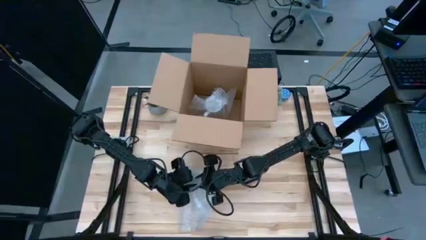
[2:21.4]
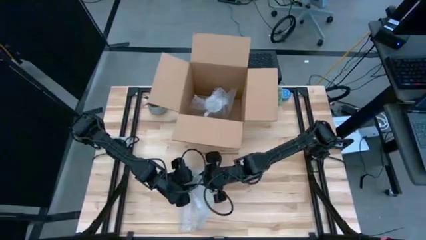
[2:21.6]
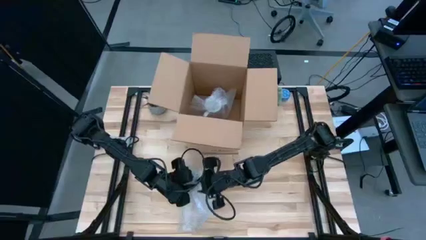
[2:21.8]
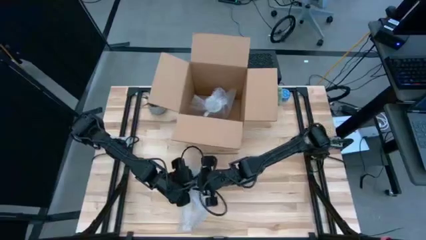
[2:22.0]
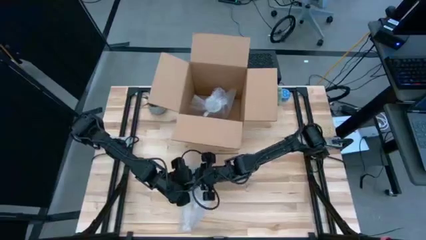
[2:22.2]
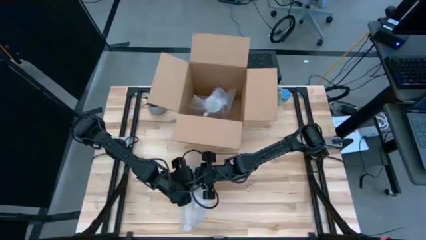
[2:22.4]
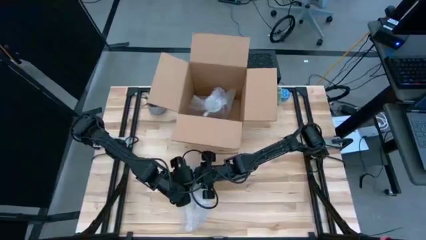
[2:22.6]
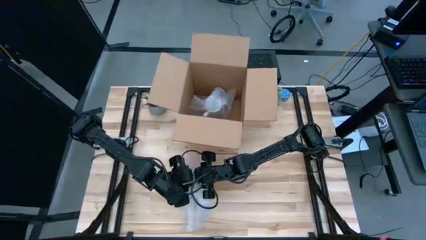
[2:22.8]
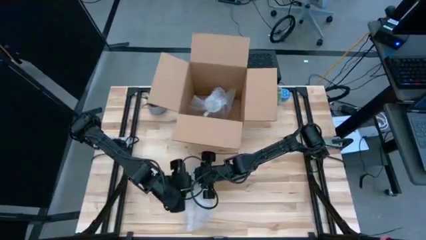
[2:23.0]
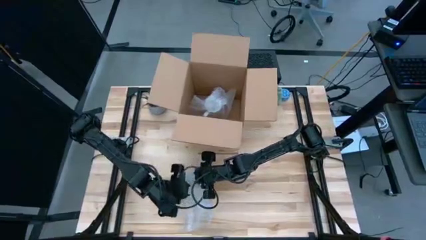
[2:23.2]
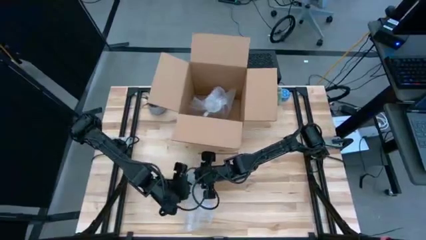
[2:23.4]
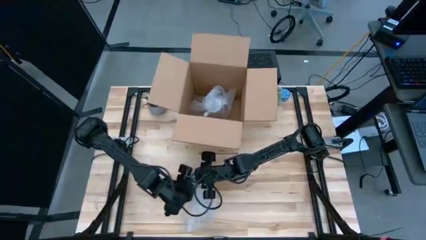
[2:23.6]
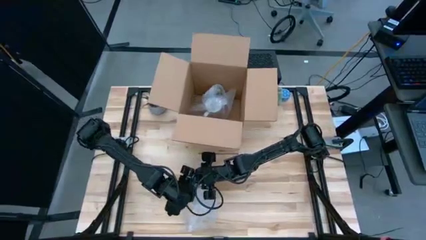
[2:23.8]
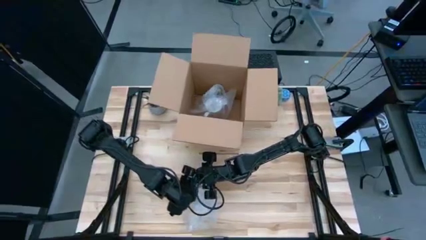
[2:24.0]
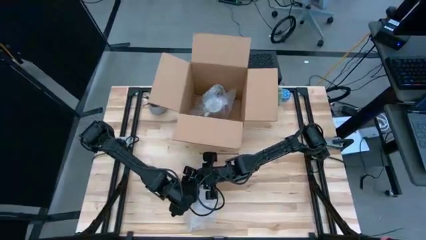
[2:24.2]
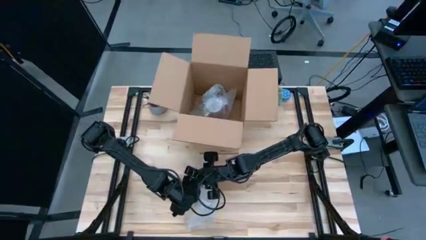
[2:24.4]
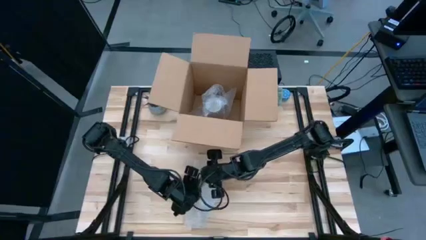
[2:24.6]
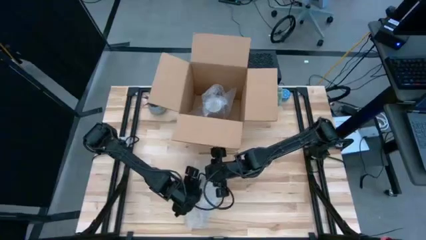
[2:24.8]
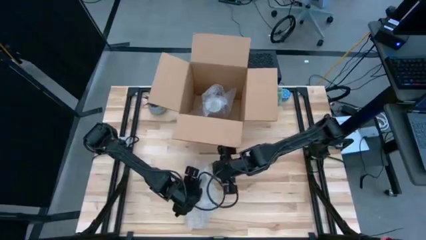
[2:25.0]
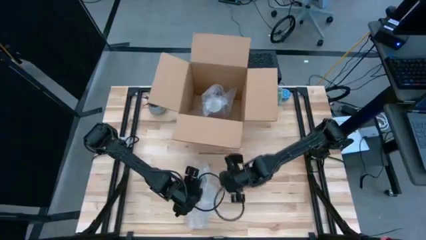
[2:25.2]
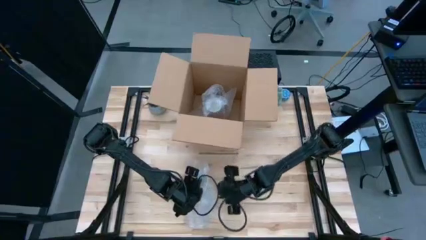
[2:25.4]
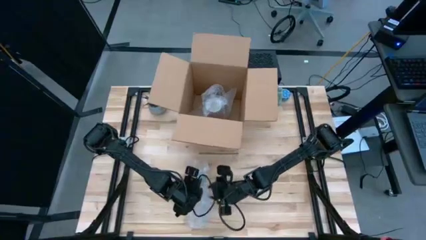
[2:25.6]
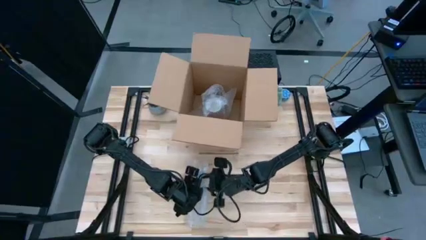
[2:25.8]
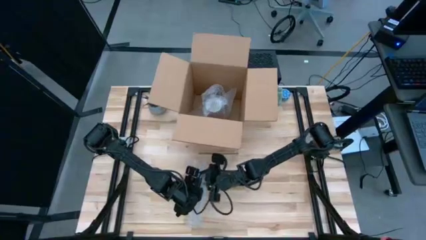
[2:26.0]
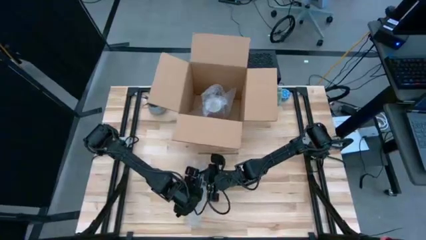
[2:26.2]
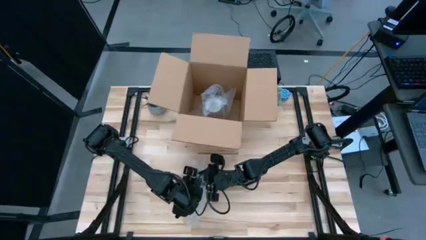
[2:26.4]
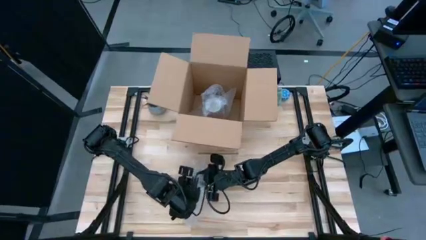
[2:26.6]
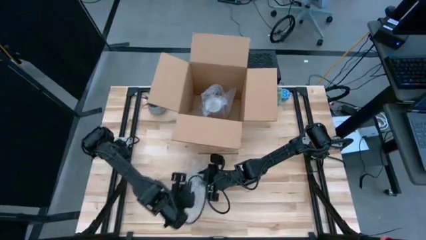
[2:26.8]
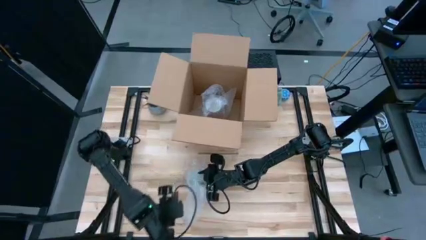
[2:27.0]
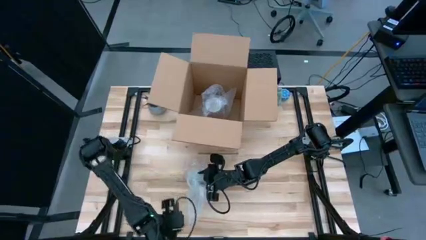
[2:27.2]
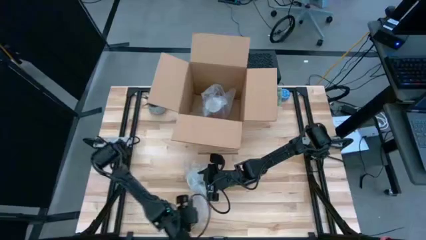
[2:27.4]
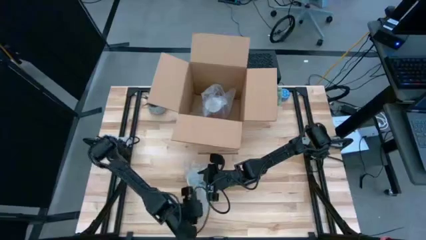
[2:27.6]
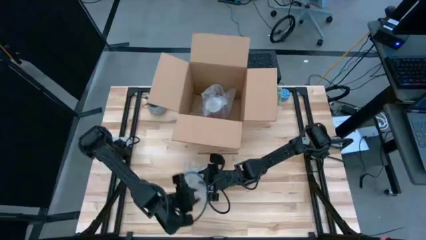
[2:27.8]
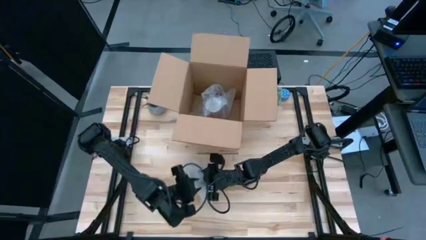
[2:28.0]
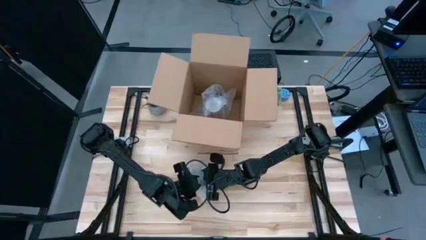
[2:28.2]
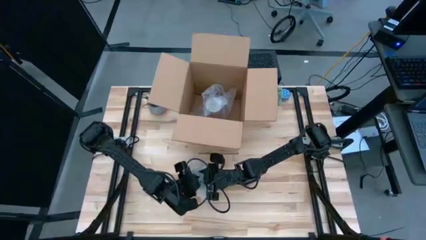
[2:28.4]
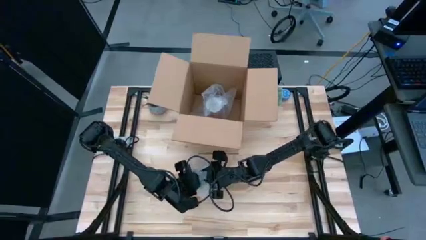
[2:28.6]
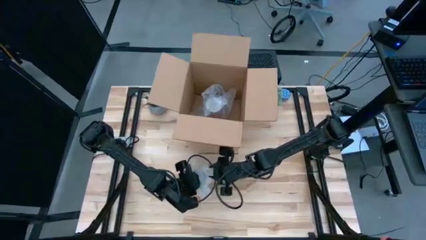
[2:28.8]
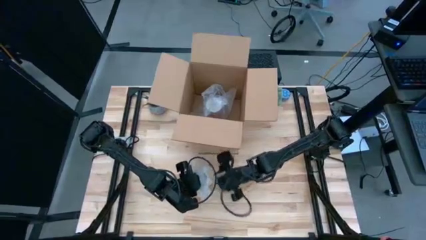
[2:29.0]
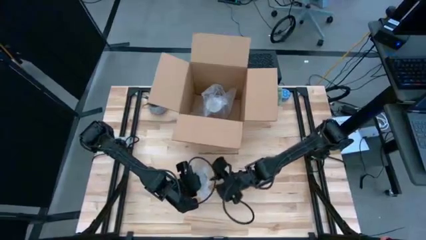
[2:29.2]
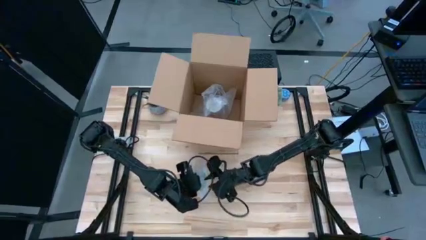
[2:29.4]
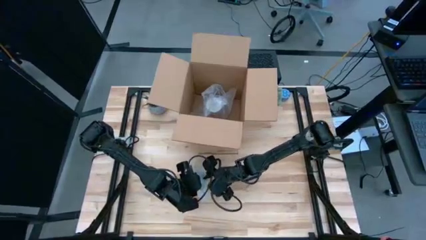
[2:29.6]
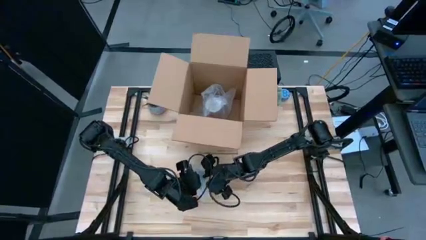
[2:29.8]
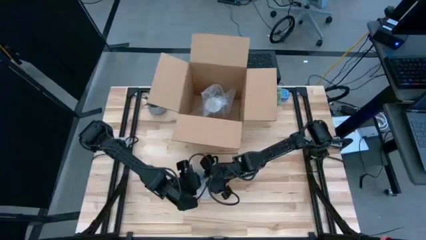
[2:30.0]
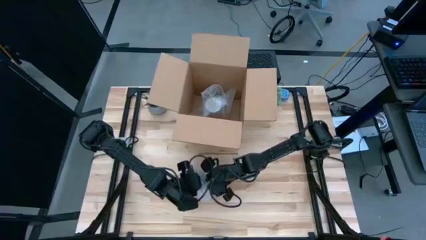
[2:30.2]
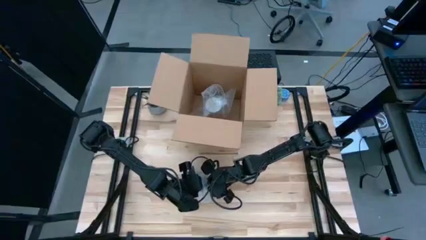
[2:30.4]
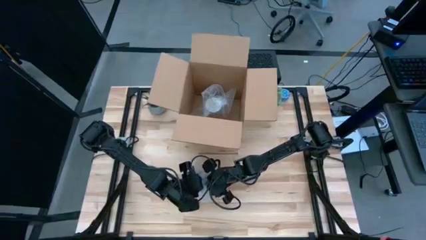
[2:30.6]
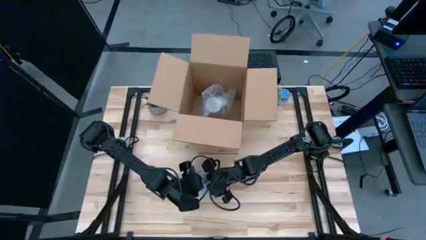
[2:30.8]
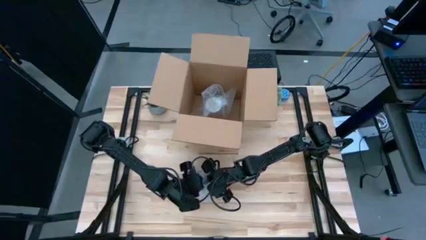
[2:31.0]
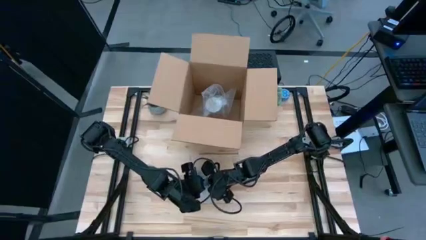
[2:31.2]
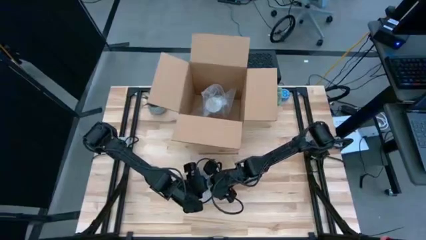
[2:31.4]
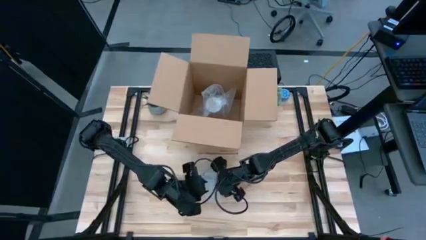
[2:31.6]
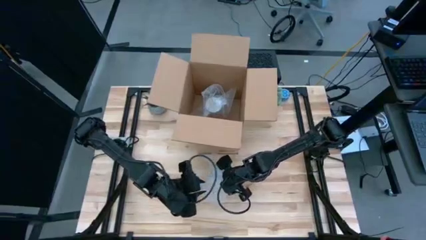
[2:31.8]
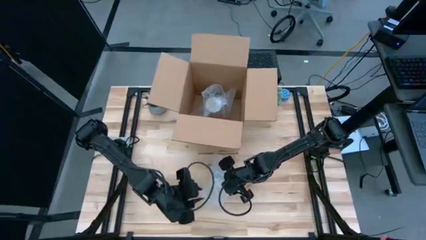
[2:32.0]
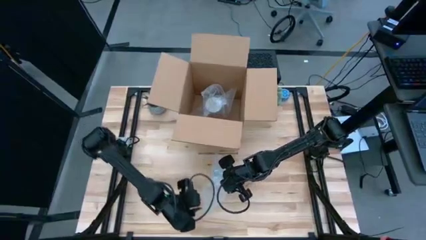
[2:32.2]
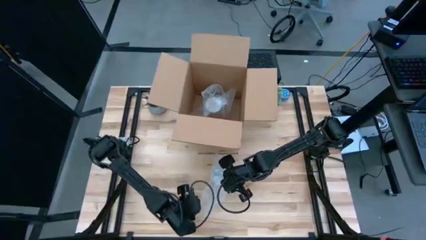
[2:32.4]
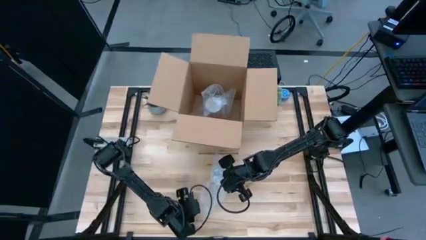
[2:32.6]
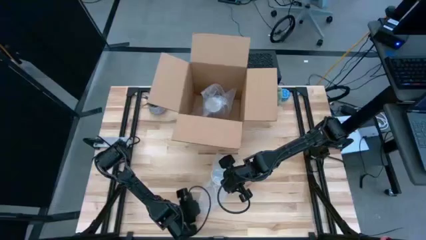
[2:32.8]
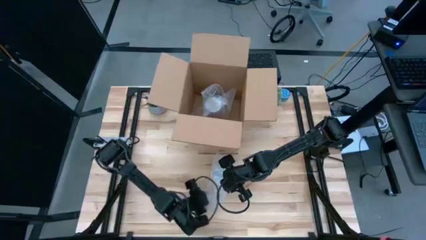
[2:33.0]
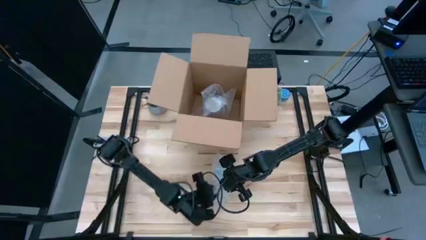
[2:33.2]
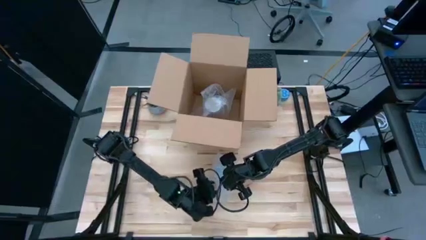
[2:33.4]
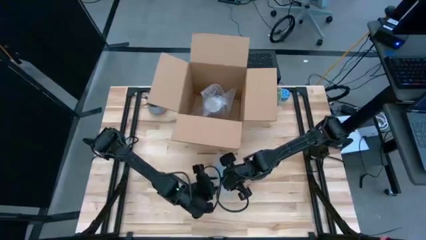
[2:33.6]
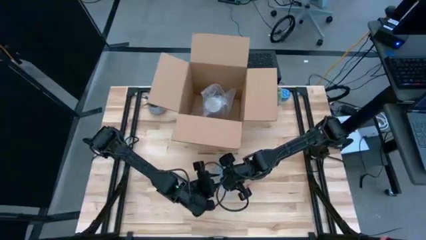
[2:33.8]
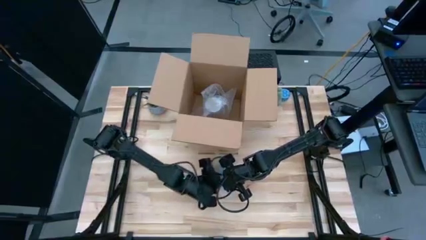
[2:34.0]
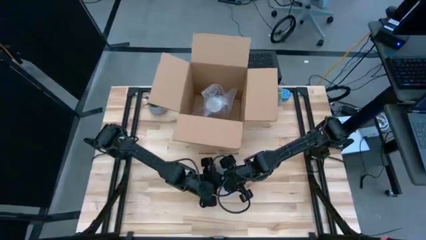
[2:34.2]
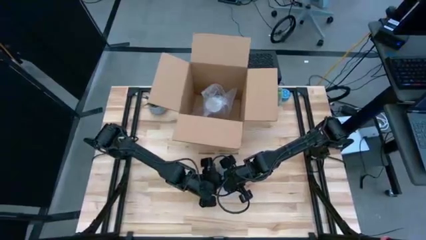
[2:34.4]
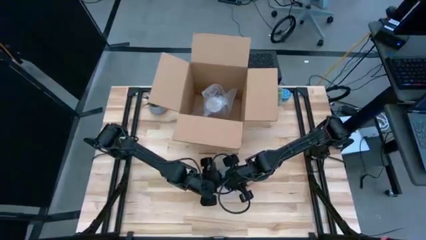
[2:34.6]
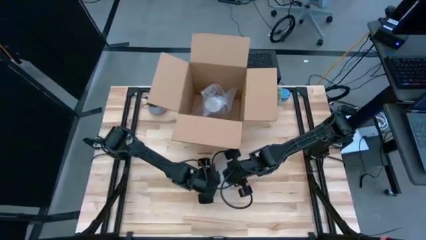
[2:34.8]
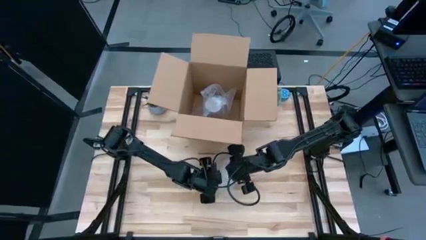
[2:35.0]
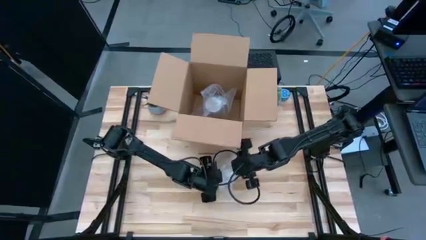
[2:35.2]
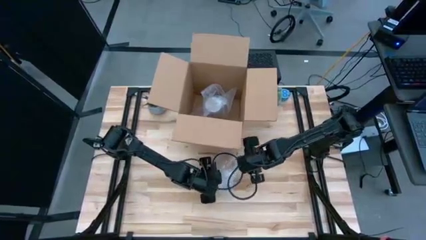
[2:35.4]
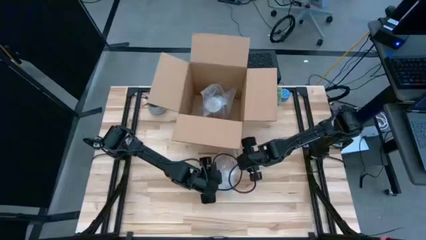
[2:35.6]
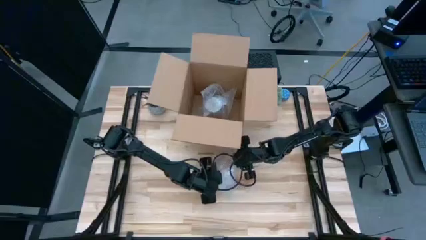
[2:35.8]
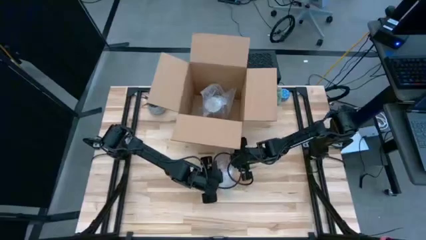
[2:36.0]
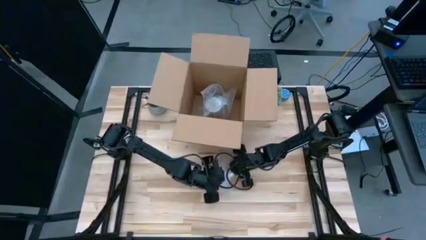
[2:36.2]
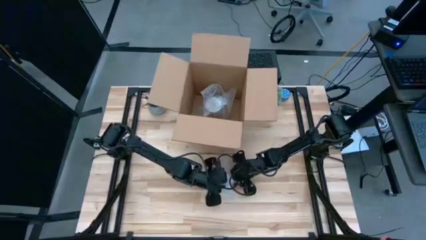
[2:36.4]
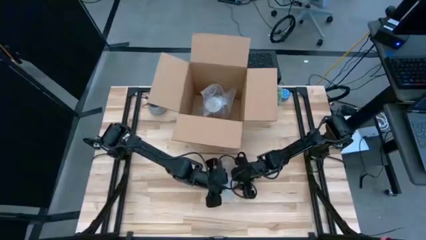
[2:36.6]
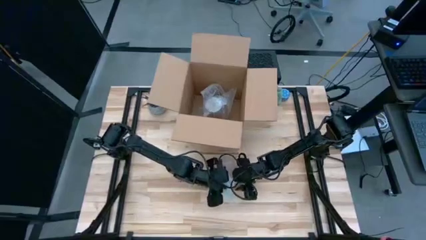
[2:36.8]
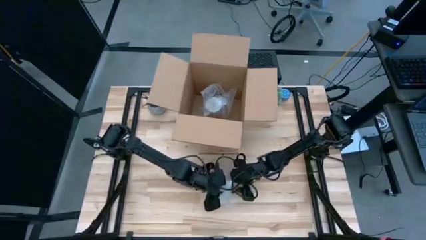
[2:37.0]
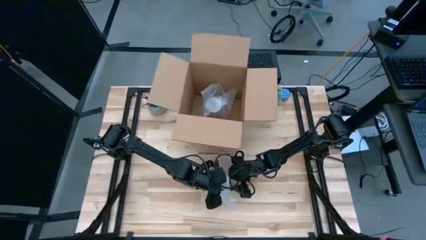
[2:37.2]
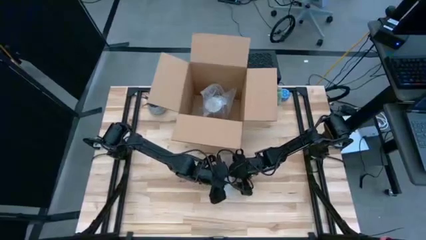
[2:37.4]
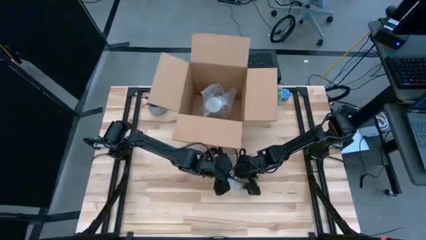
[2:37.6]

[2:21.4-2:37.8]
Task: wrap mug
Wrap the orange mug with bubble wrap
